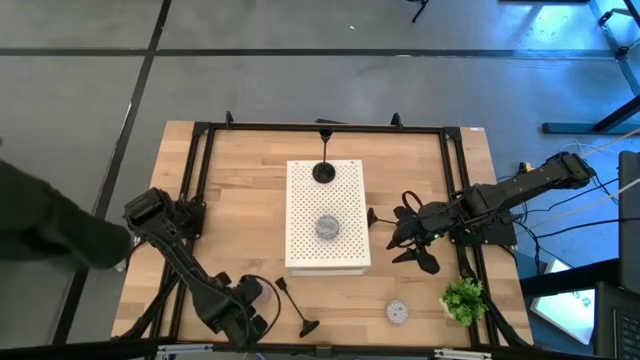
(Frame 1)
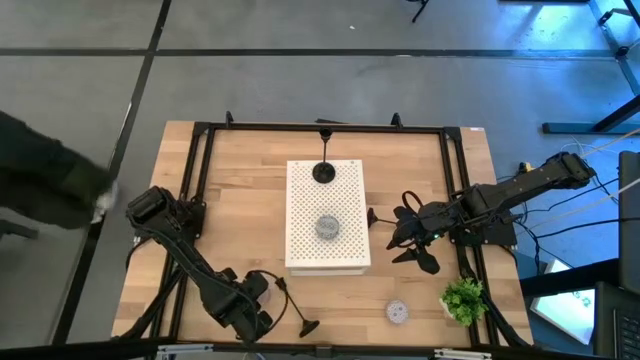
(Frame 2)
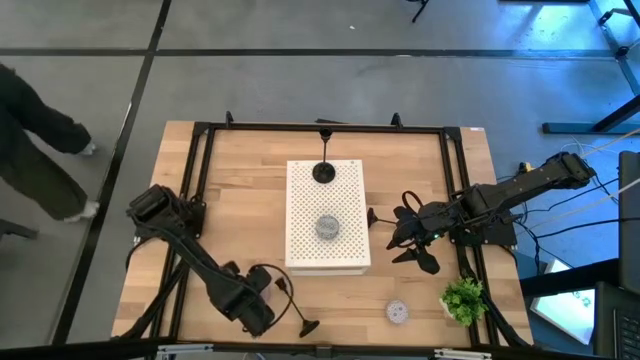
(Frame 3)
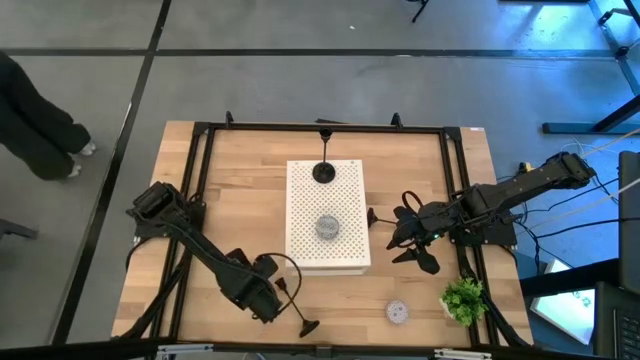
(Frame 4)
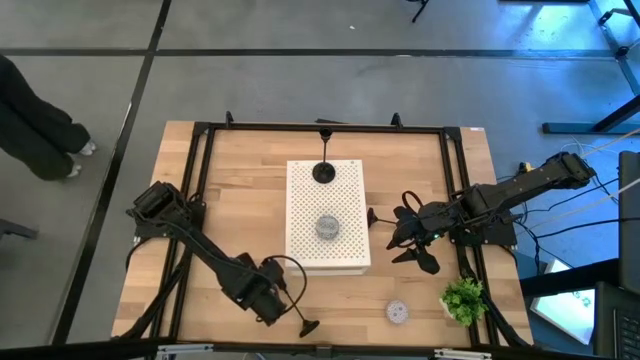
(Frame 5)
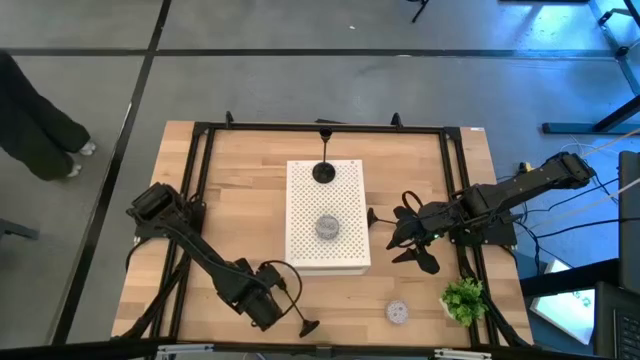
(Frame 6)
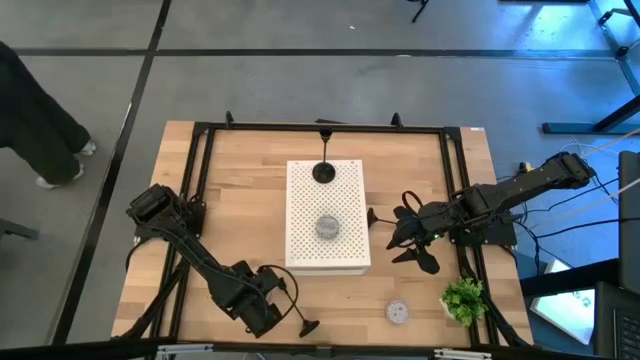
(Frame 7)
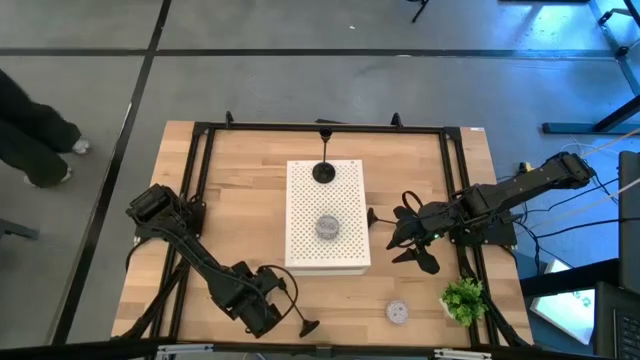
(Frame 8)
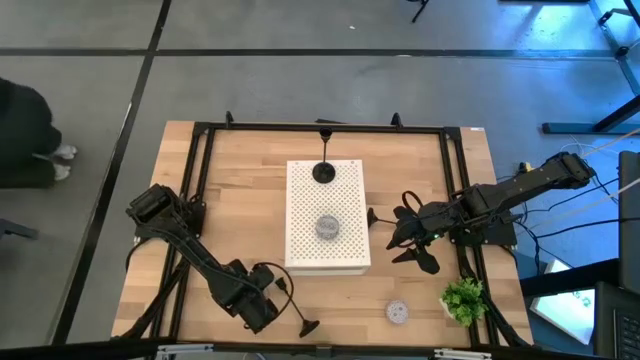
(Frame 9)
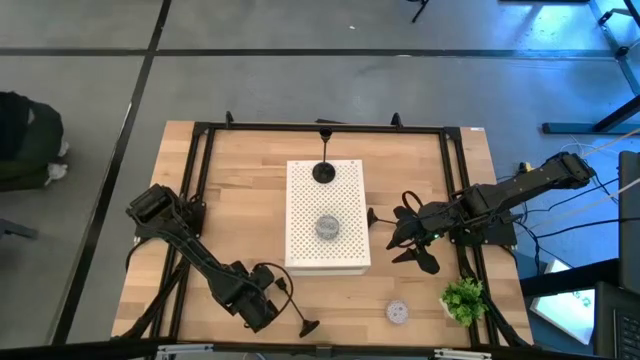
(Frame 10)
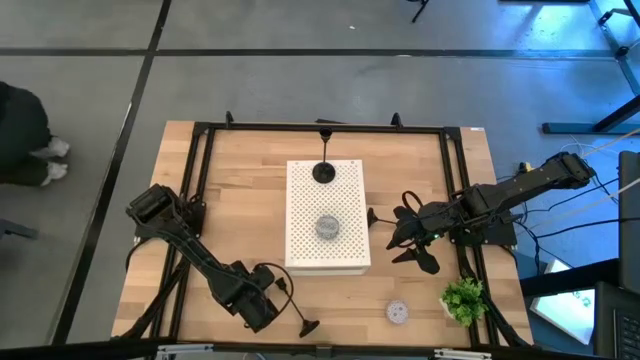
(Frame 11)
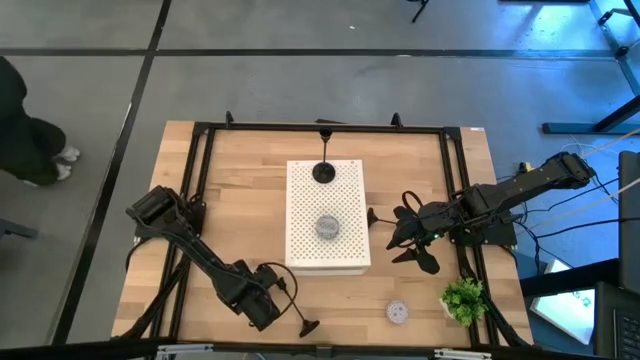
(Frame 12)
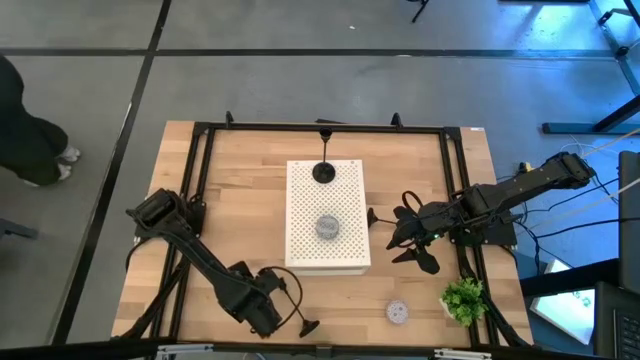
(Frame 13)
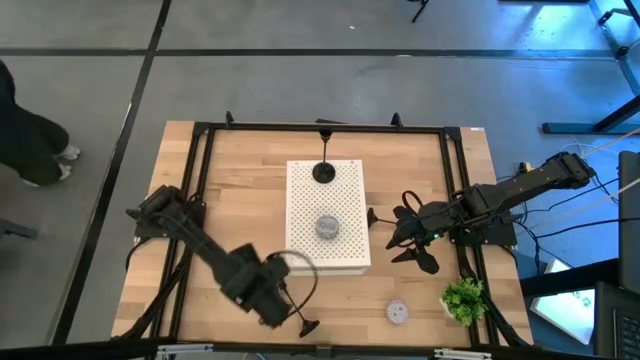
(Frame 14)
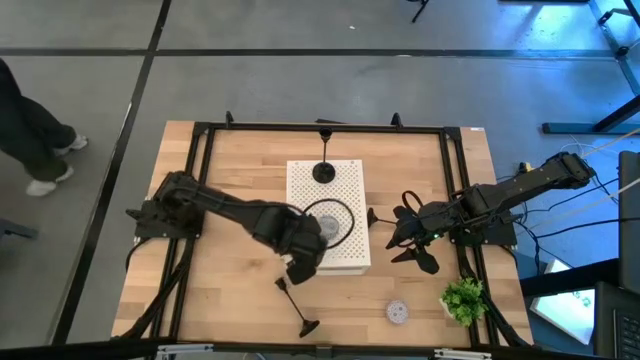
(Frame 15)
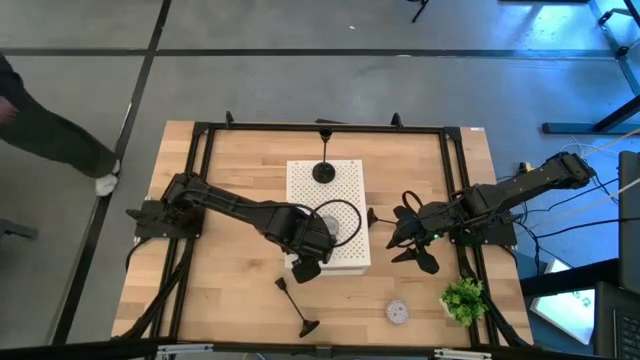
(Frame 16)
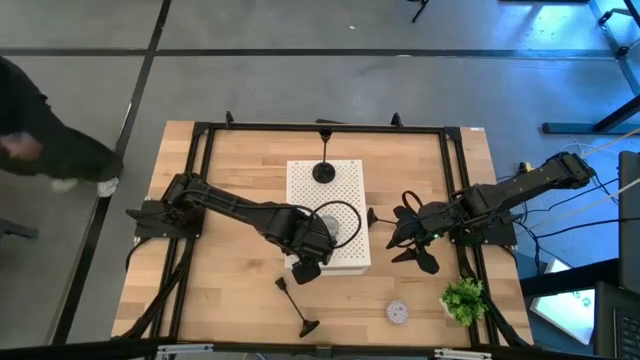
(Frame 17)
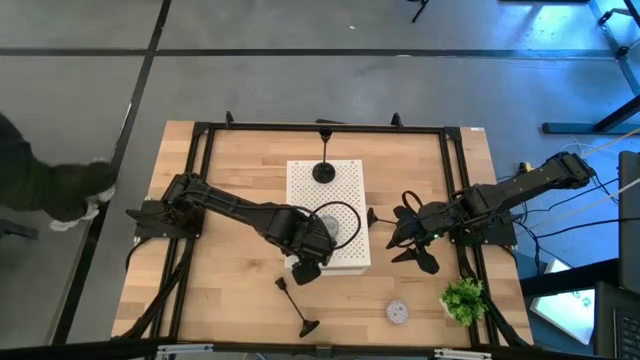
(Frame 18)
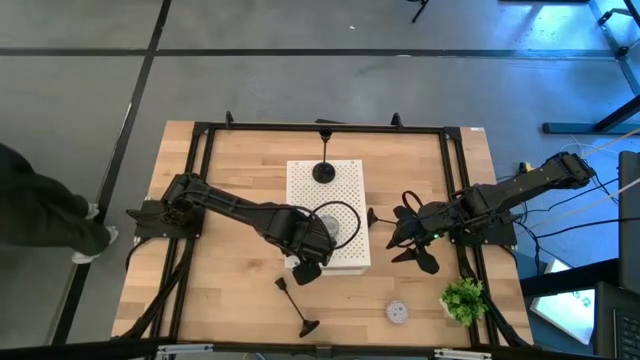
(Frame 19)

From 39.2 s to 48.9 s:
Task: Pick & Place candle stick holders
Put the left pink patterned scented candle on the shelf

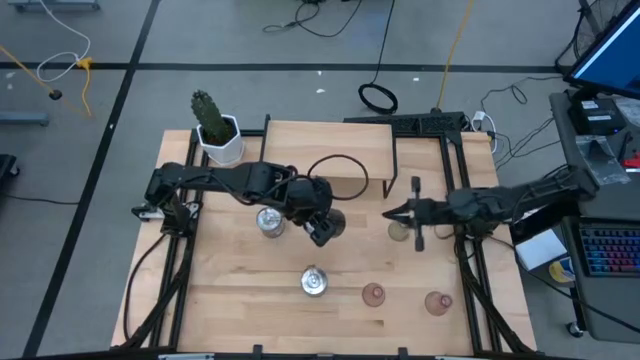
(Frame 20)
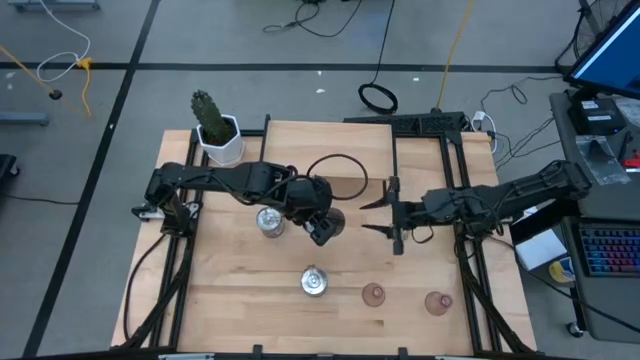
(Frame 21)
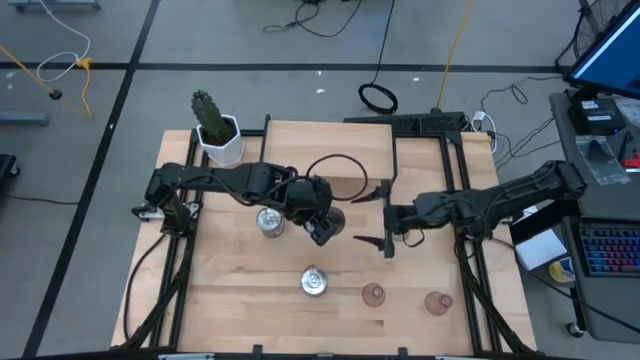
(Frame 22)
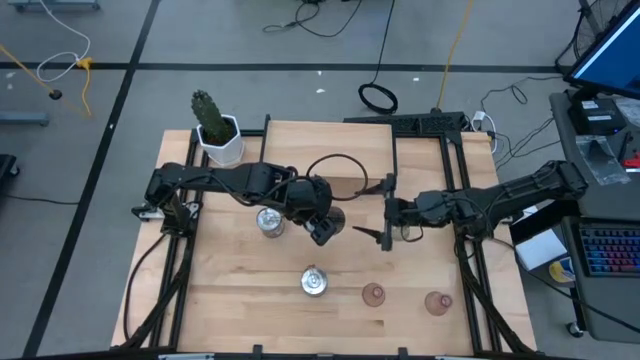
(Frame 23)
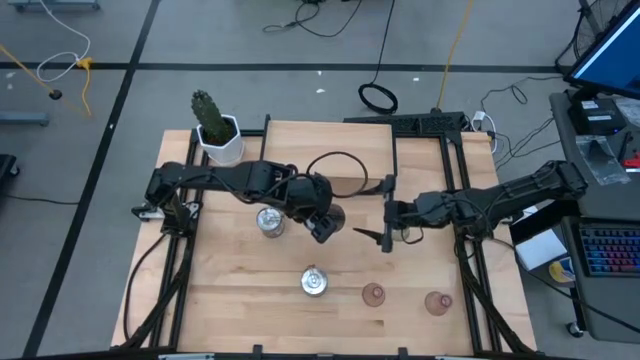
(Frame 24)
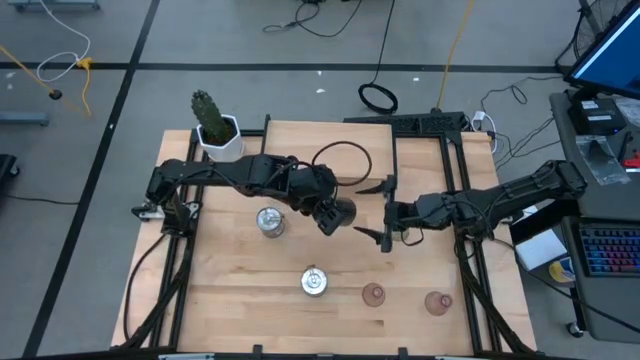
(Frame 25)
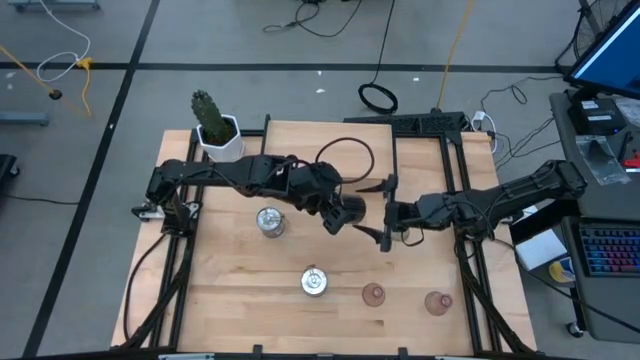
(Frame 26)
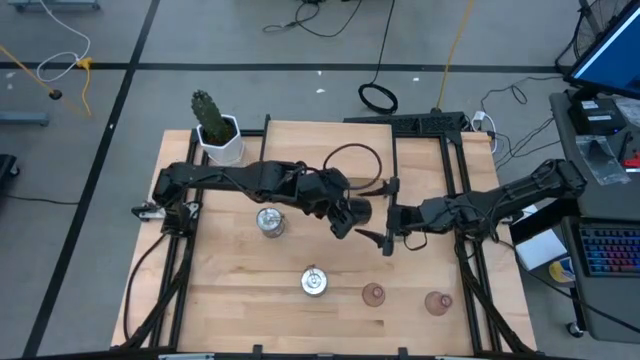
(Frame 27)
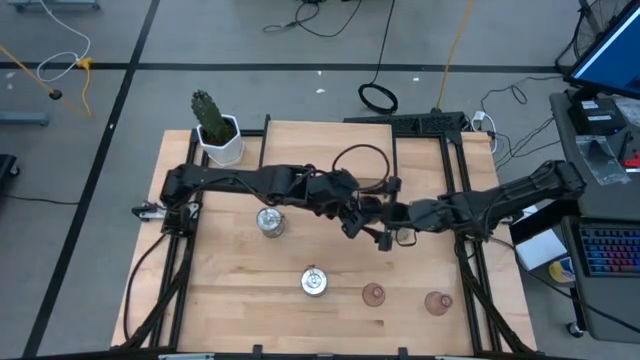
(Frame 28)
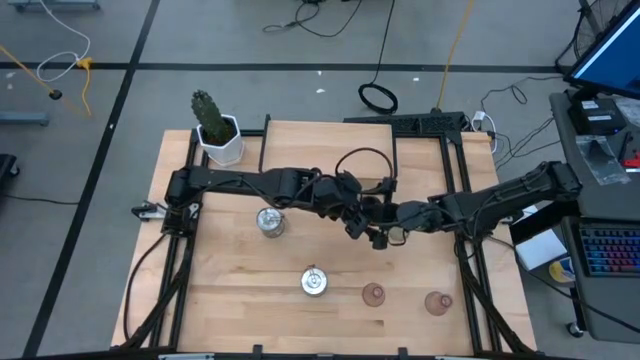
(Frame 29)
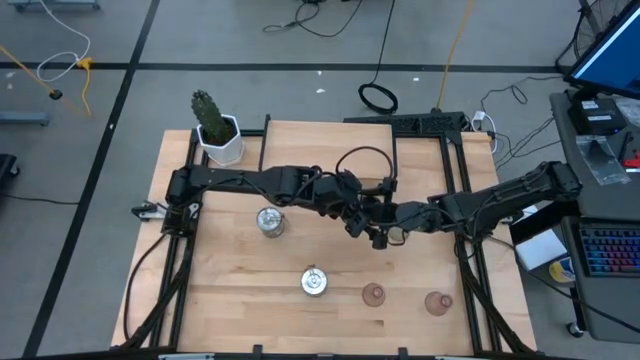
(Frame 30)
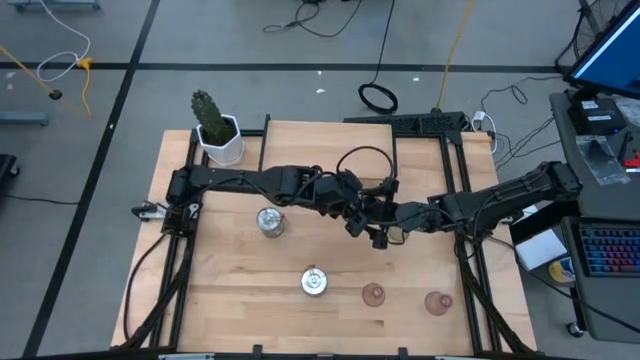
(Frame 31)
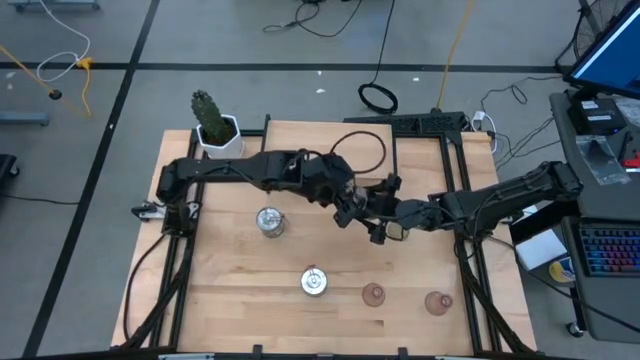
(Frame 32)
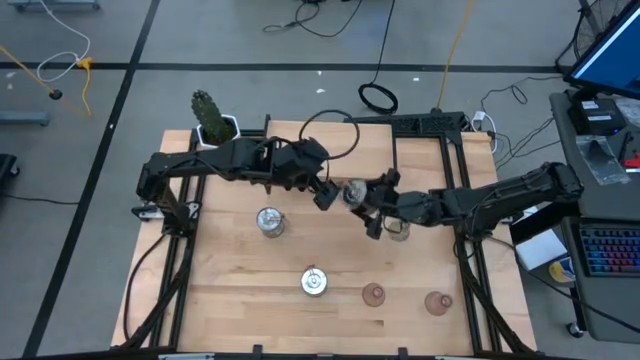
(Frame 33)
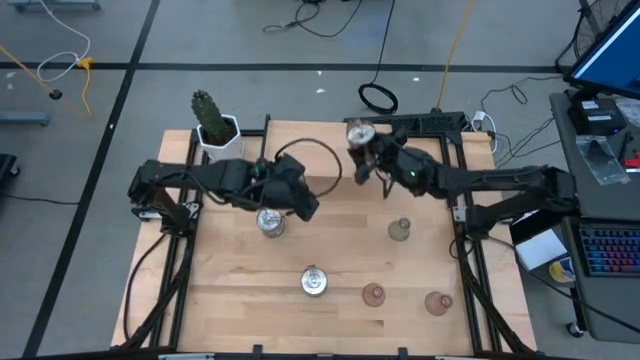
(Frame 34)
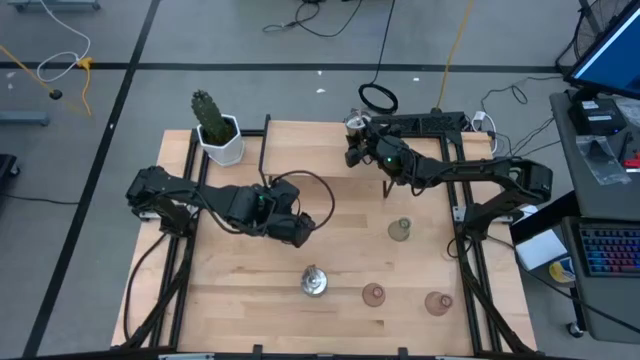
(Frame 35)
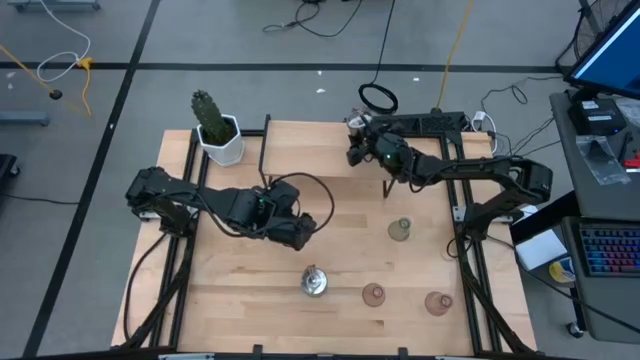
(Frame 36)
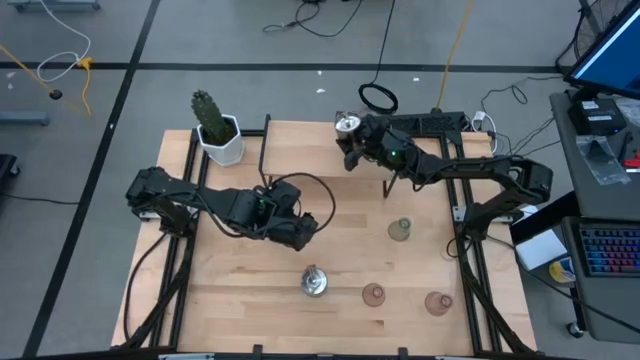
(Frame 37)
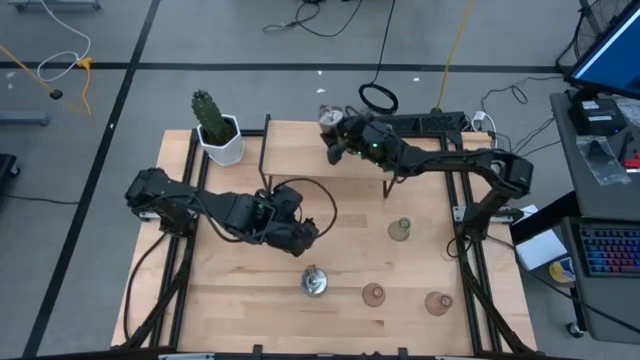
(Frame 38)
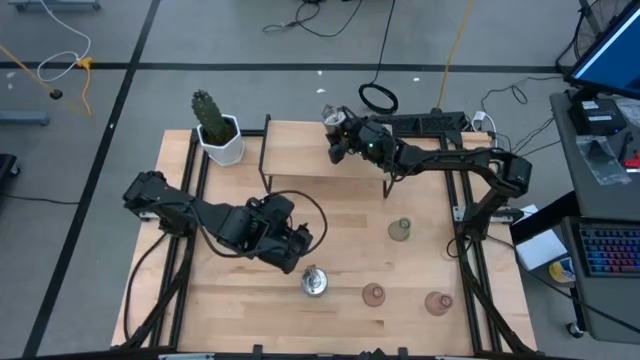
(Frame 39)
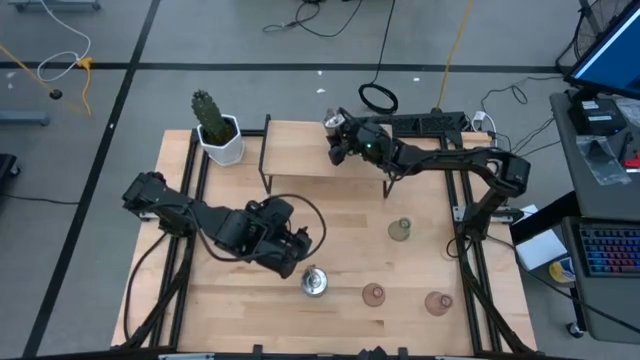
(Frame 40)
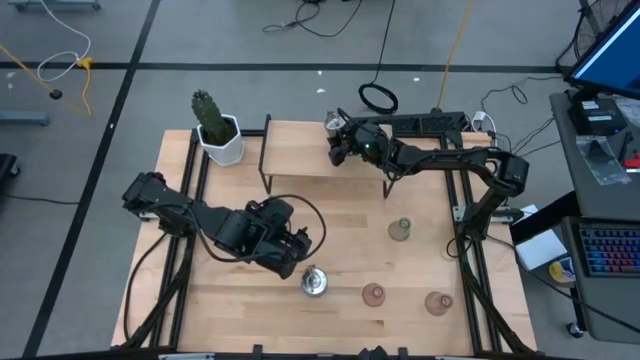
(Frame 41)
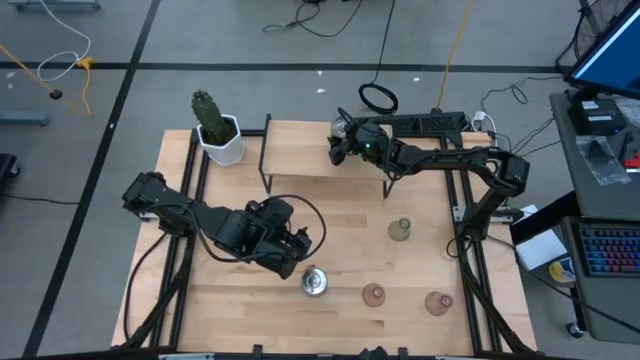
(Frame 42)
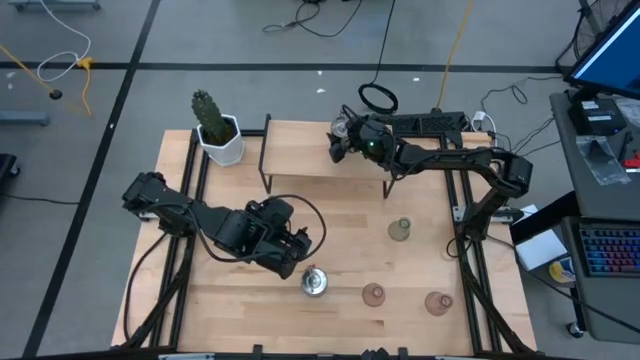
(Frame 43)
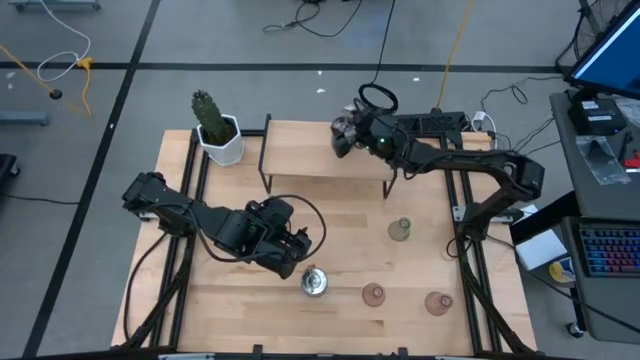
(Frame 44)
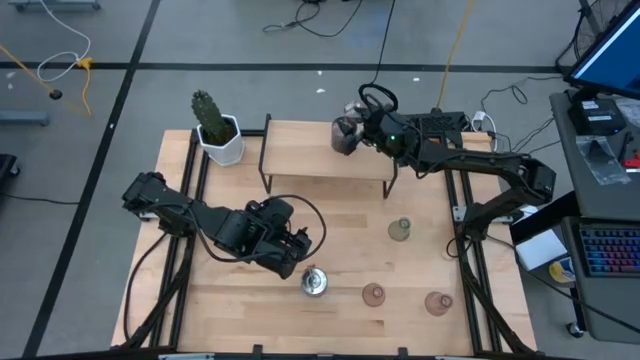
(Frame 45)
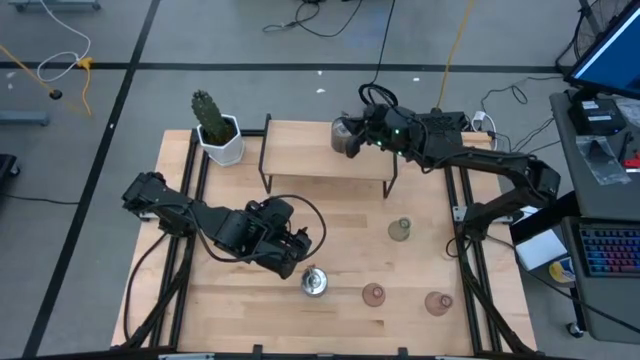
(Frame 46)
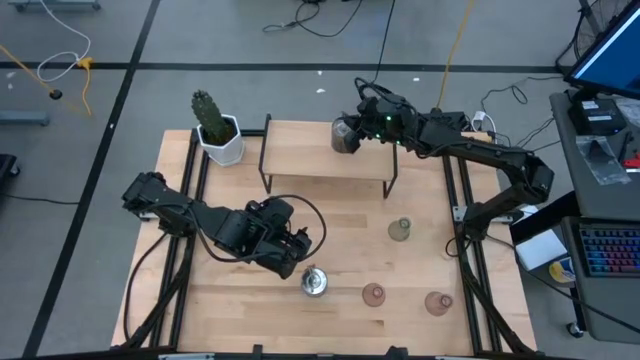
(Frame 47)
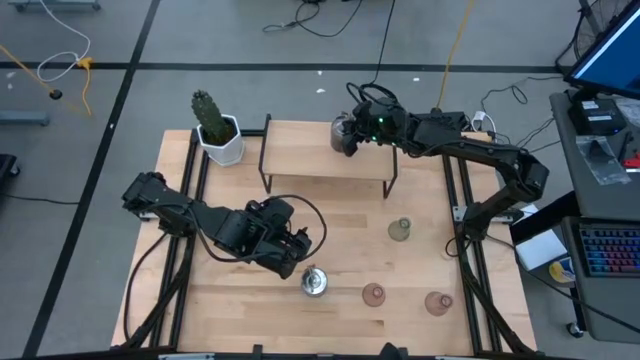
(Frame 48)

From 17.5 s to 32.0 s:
Task: Pick & Place candle stick holders
Put the bottom left silver scented candle on the shelf
